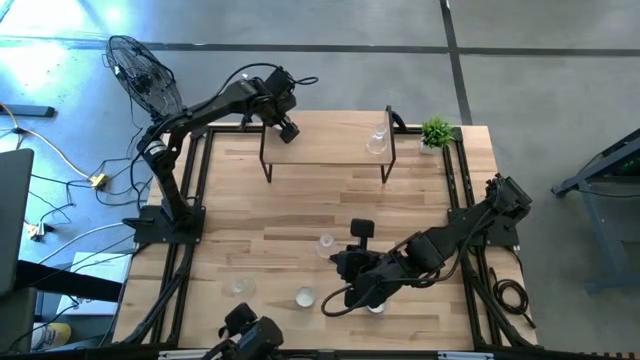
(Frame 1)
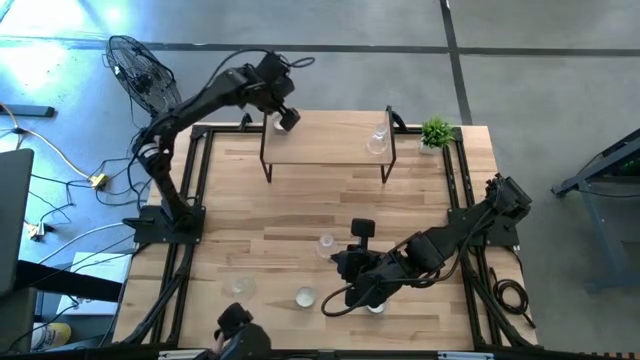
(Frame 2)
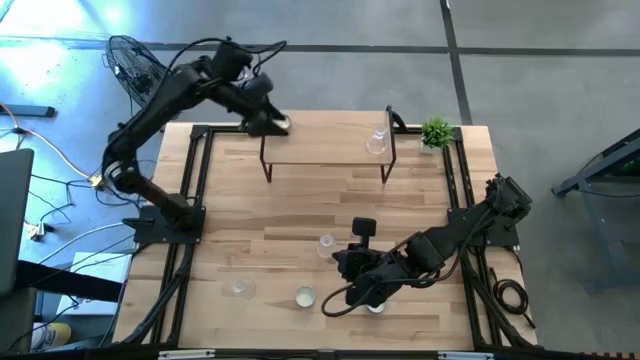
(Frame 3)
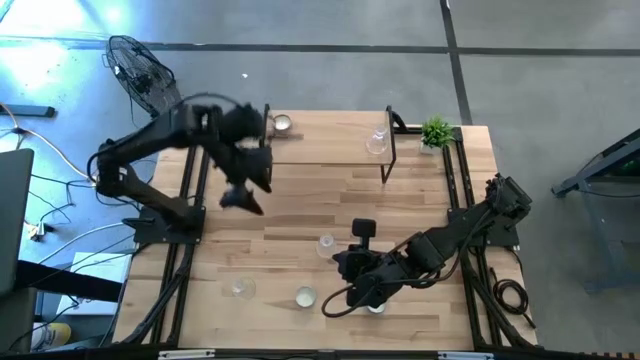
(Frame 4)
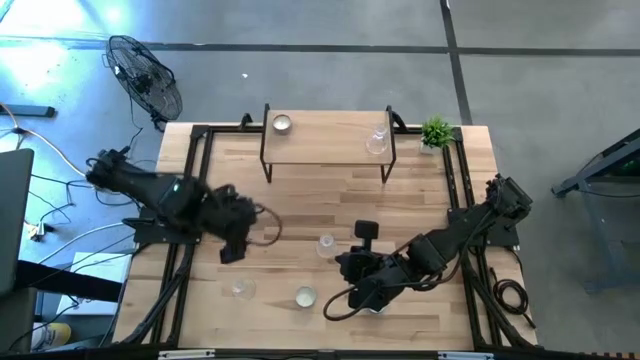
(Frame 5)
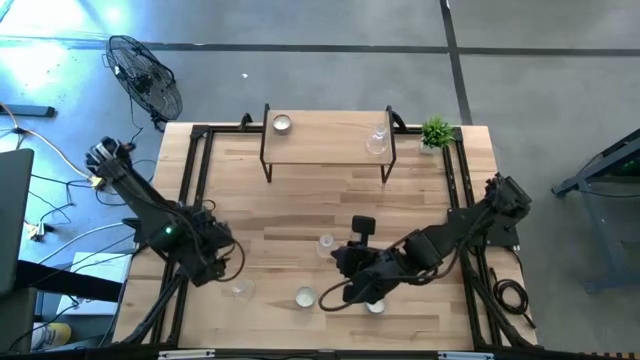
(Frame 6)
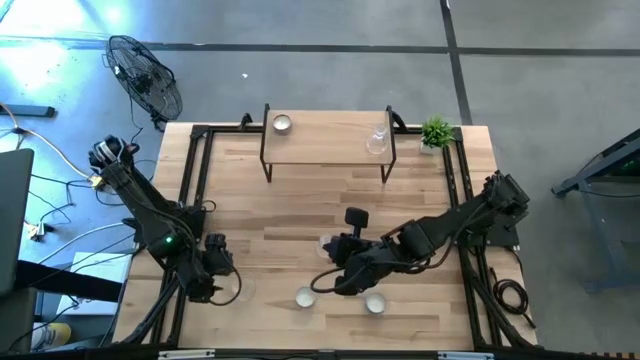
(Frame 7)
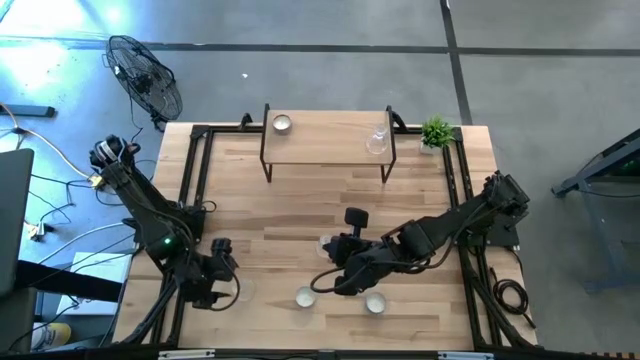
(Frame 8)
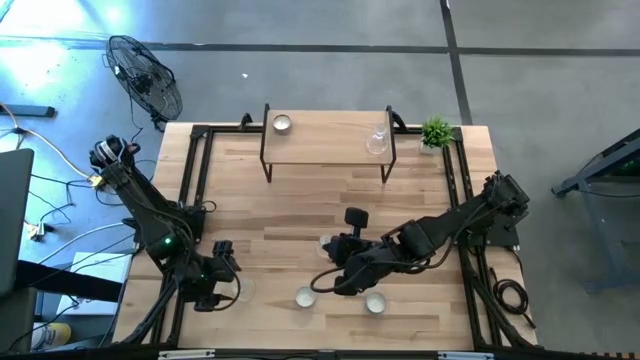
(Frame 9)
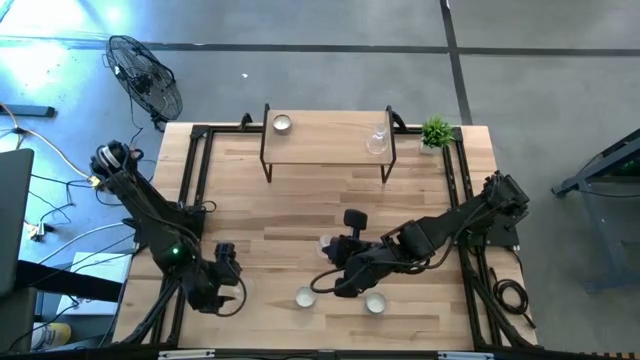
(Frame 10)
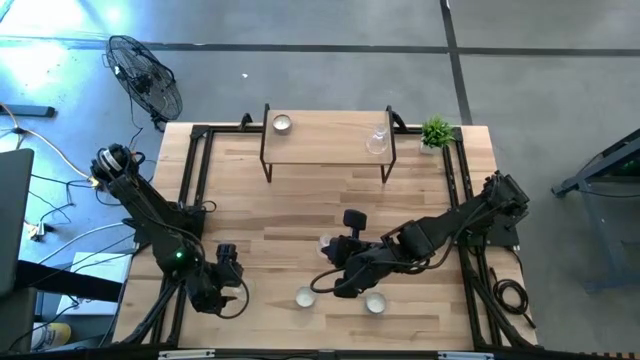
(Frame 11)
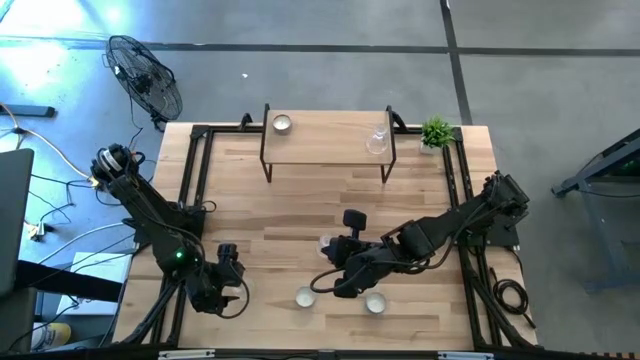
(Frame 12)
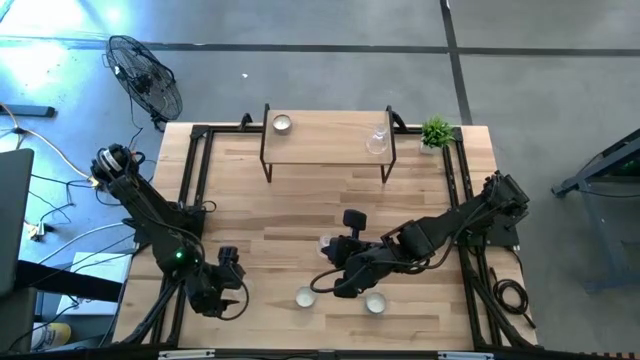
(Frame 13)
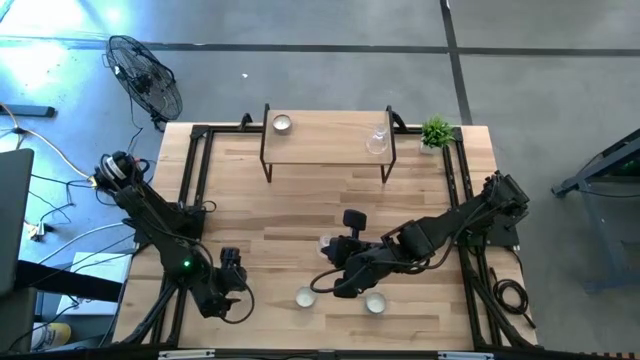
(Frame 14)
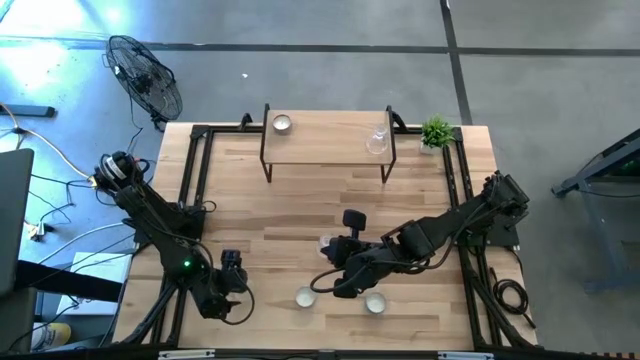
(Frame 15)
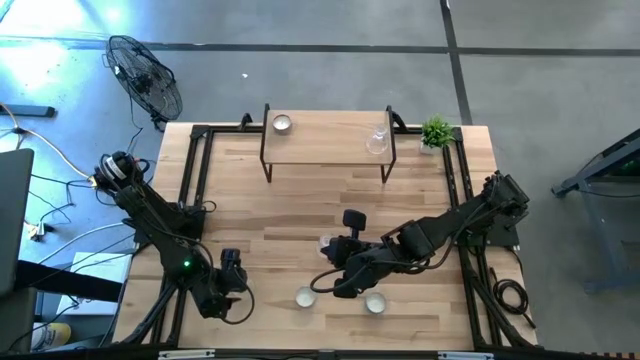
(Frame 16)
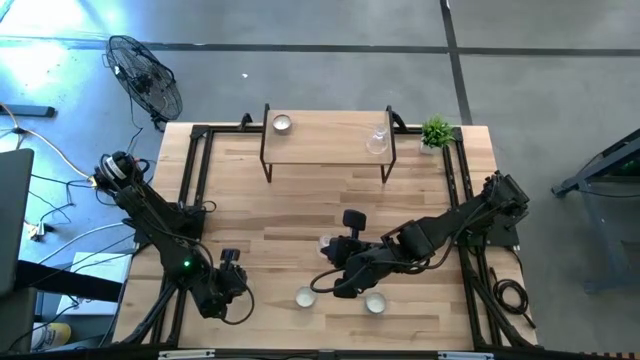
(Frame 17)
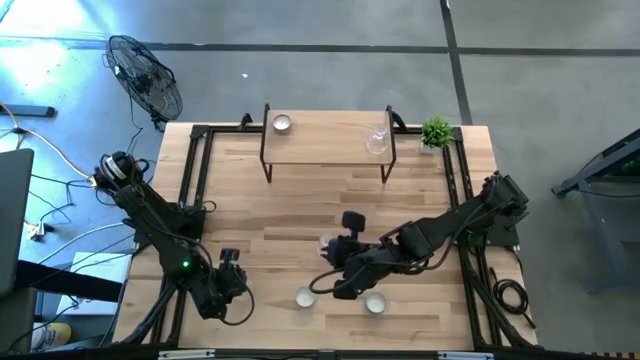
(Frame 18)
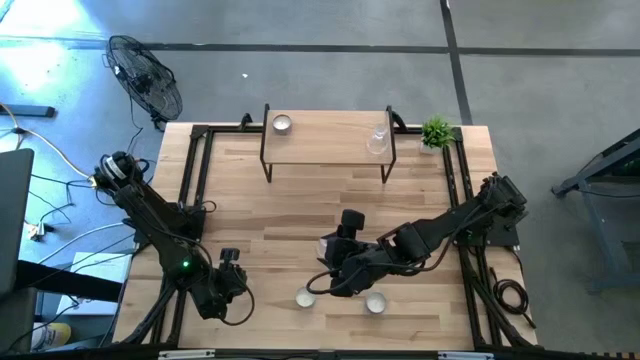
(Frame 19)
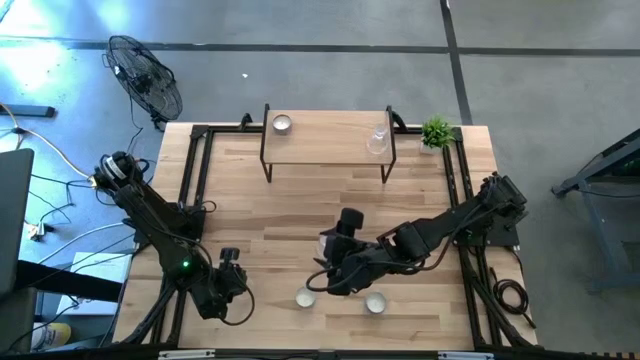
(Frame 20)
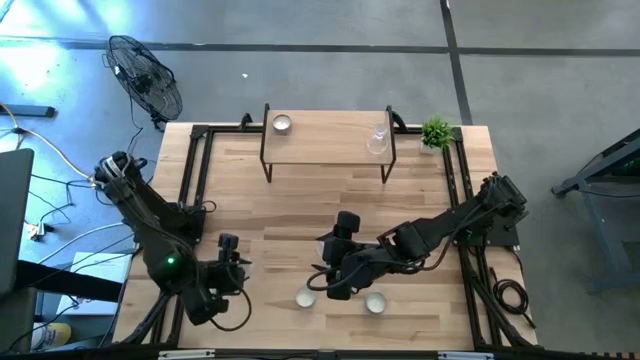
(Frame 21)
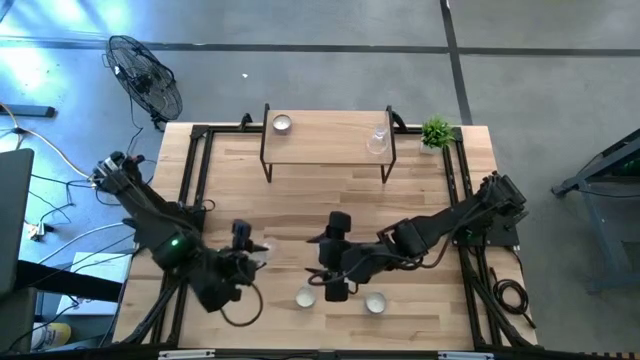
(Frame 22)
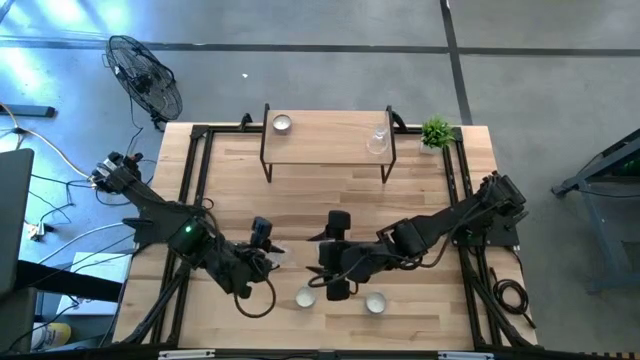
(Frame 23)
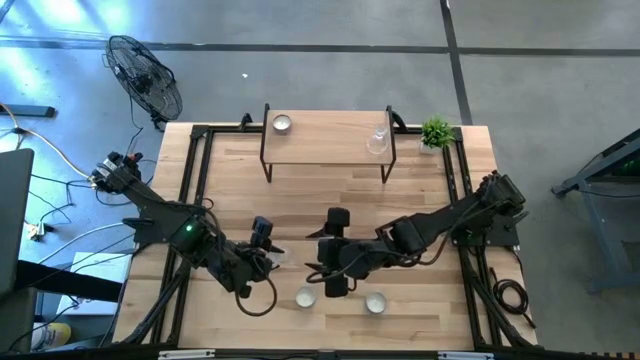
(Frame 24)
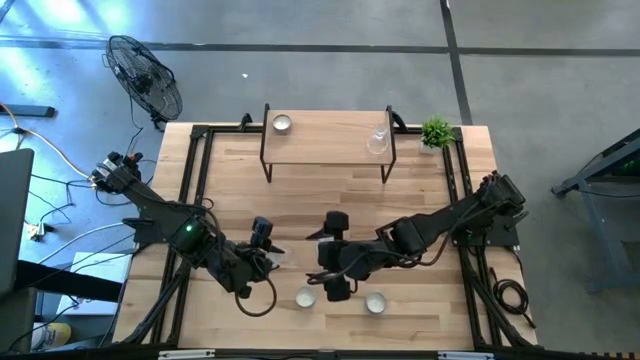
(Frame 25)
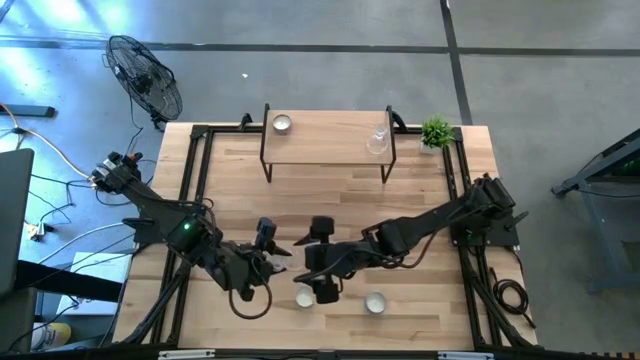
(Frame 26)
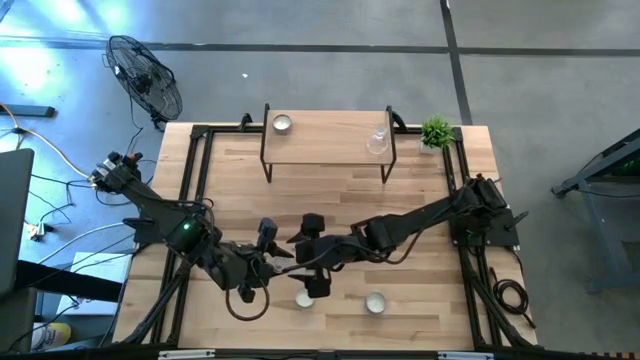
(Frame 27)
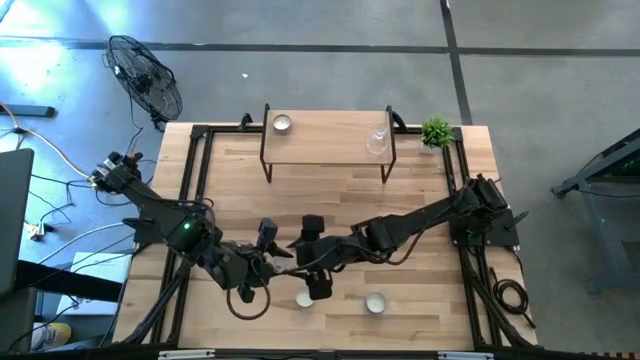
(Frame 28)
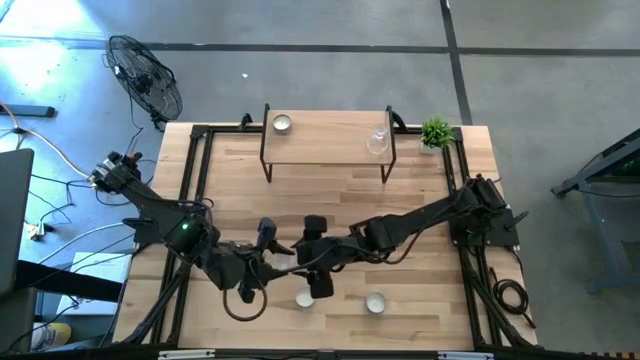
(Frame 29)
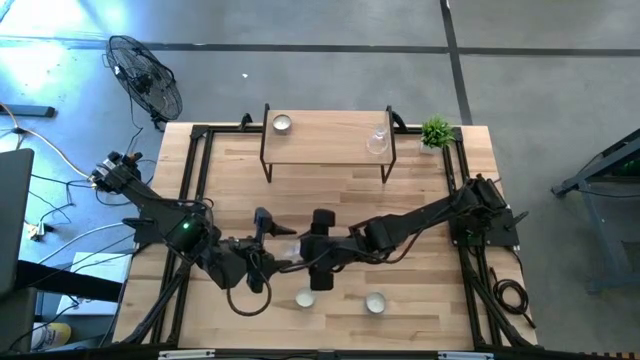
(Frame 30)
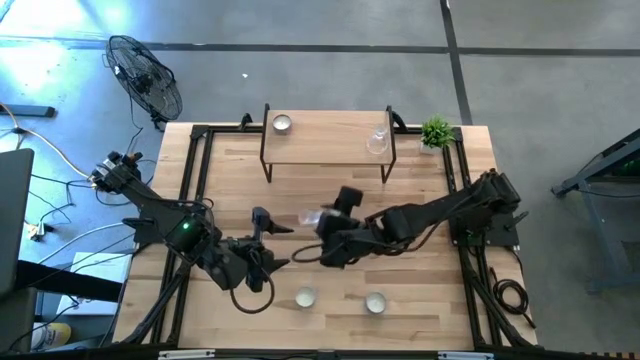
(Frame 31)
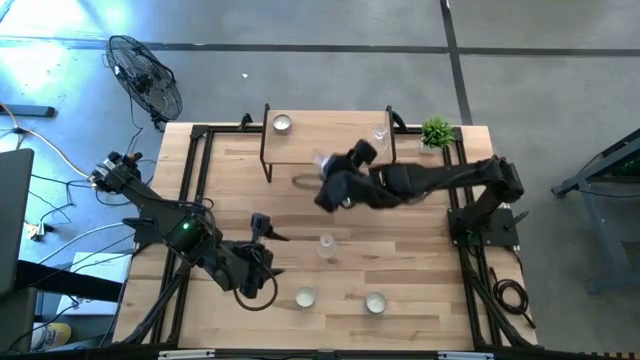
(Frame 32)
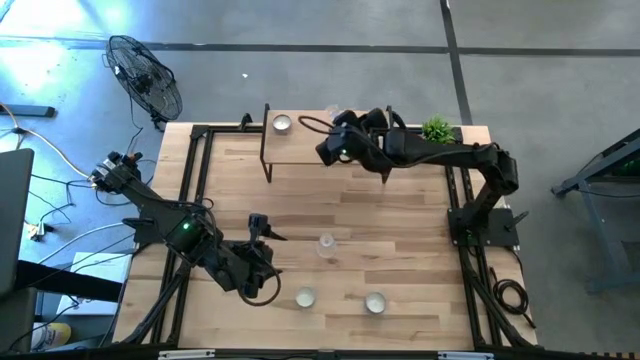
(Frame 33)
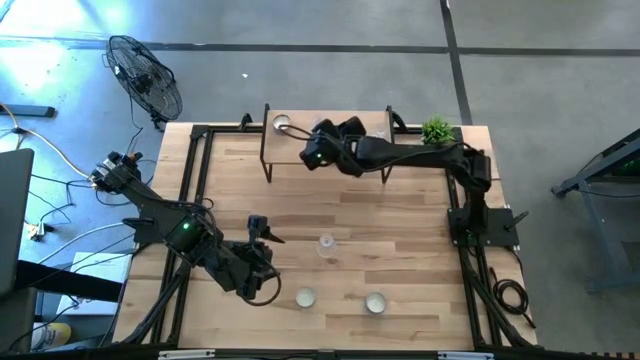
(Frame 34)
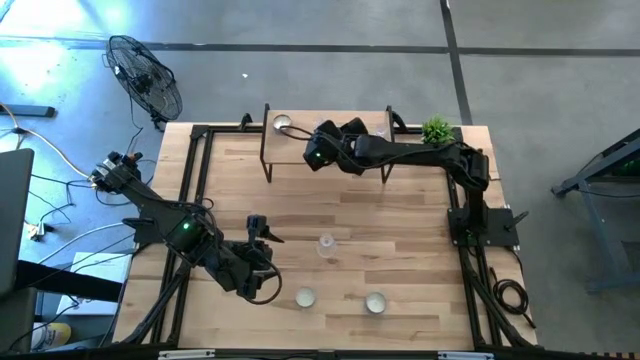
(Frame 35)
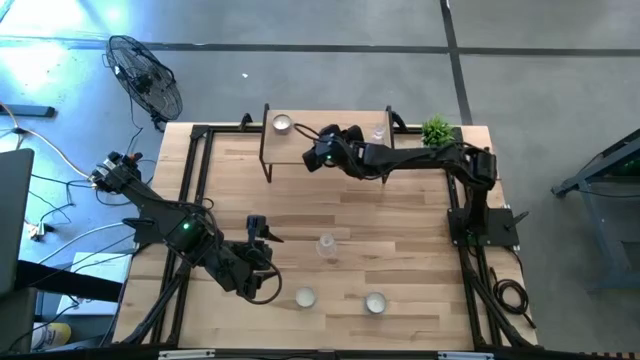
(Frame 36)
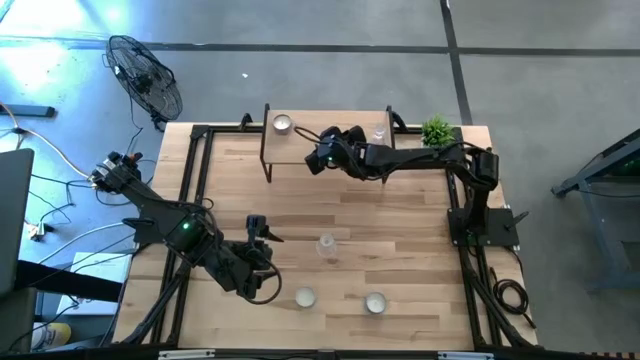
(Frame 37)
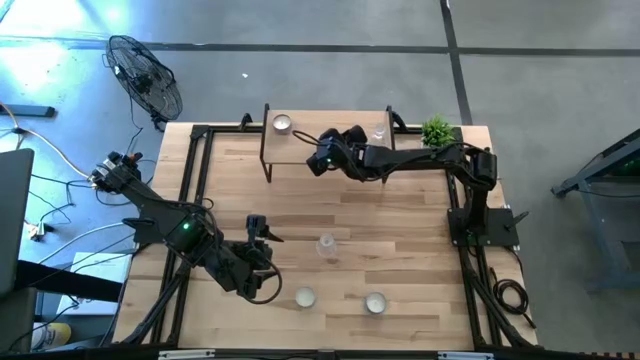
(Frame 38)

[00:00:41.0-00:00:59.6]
Task: Pick & Place candle stick holders
Put the bottom transparent candle holder on the shelf

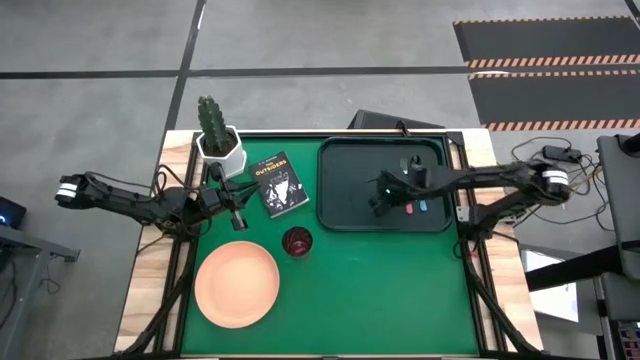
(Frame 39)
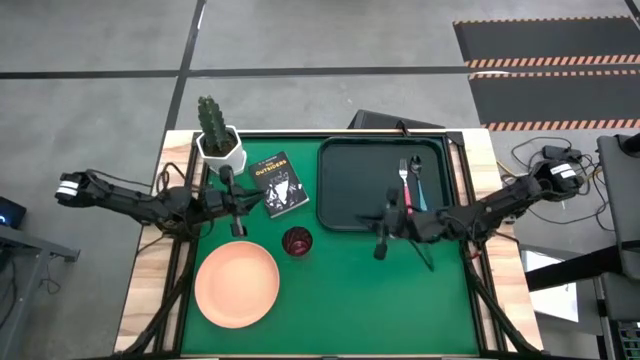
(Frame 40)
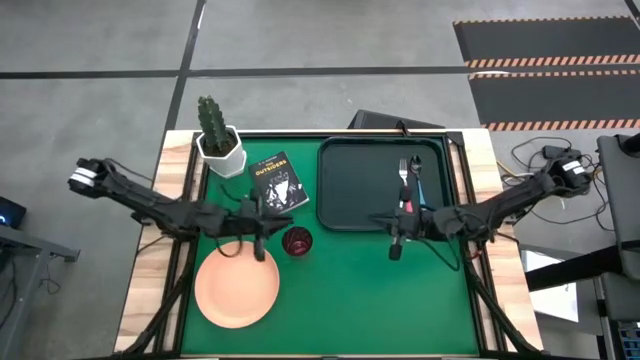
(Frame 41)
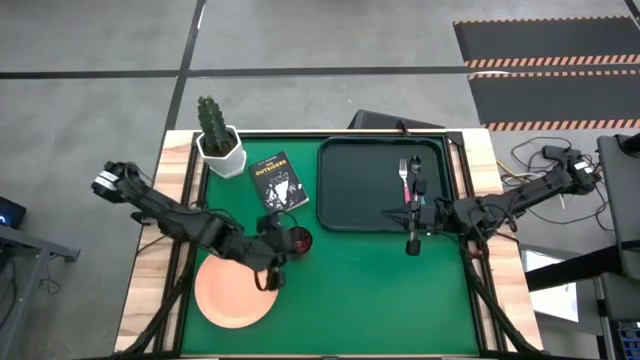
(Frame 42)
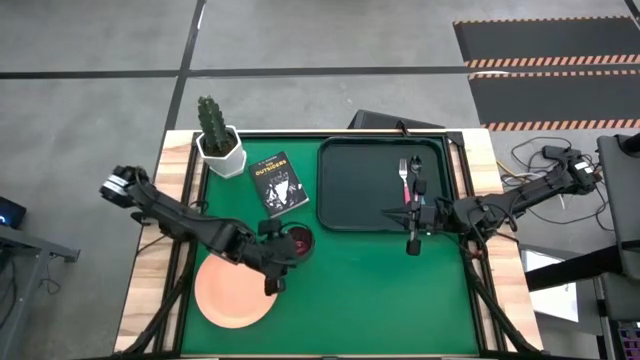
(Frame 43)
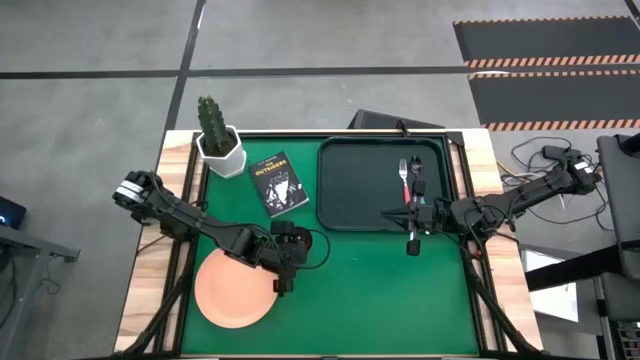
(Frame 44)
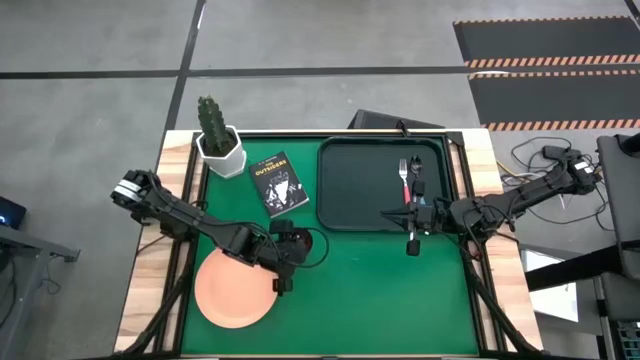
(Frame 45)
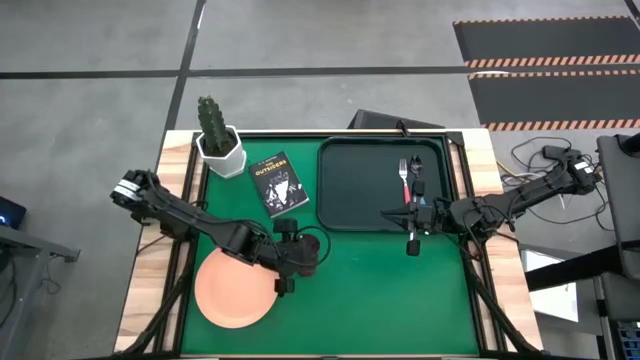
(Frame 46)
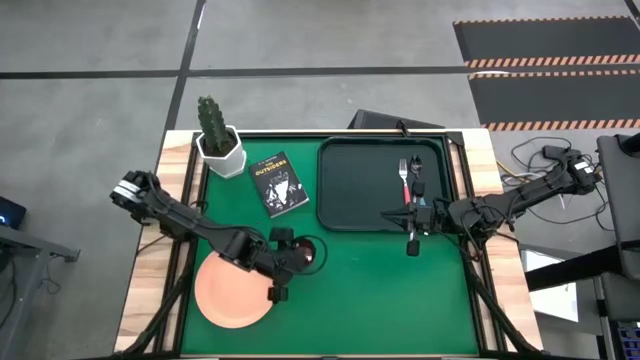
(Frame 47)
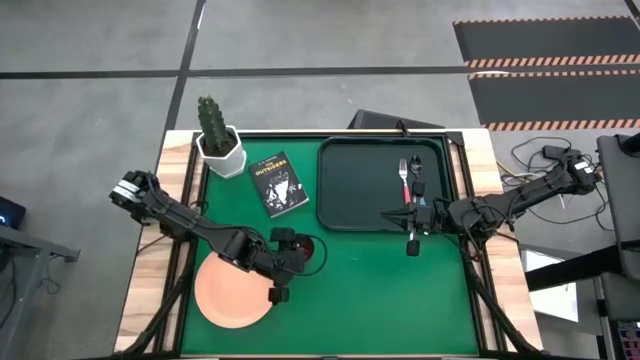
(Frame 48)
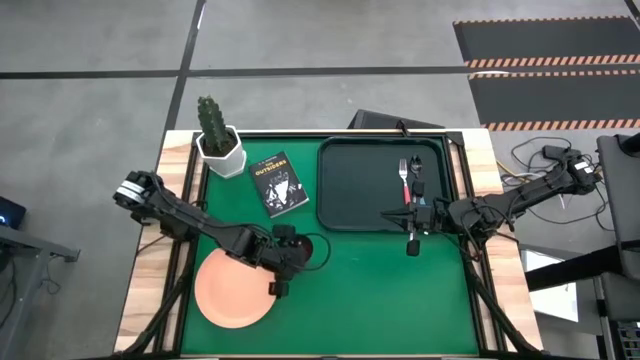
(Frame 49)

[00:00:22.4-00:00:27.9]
Task: Pick and place plate/cup/fork/spoon on tray
Put the red glass on the black serving tray
